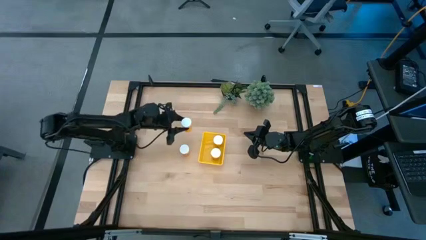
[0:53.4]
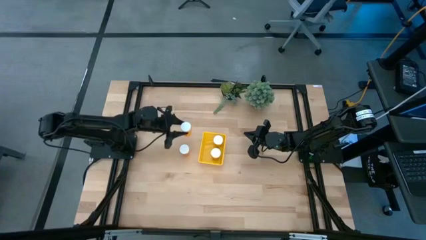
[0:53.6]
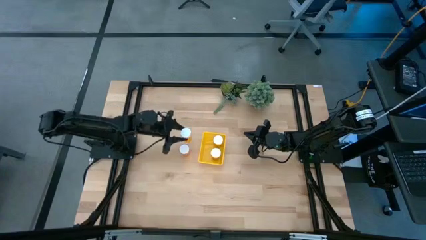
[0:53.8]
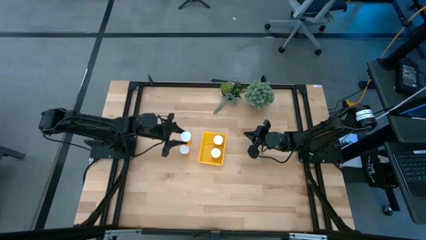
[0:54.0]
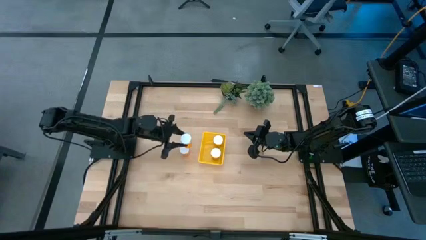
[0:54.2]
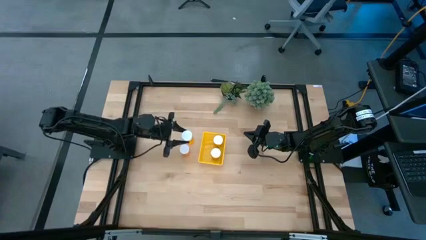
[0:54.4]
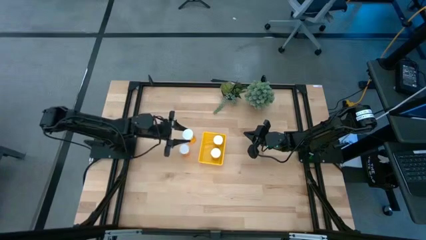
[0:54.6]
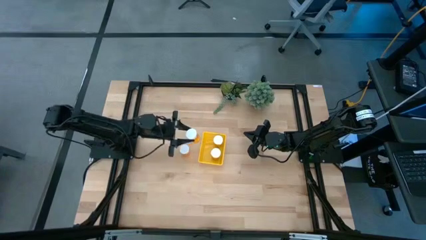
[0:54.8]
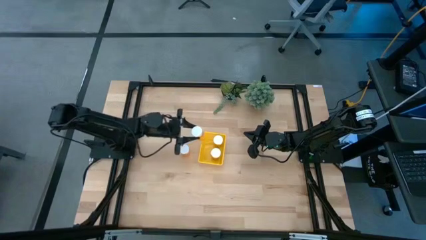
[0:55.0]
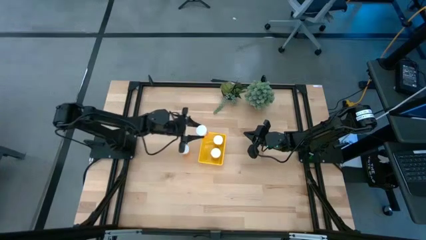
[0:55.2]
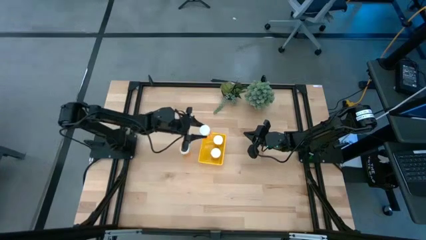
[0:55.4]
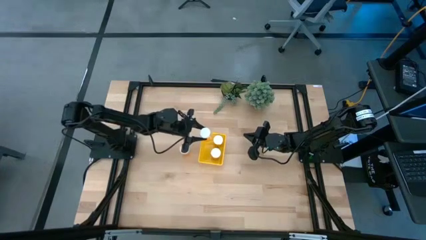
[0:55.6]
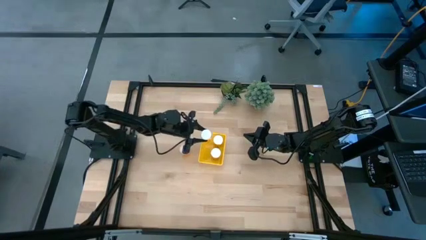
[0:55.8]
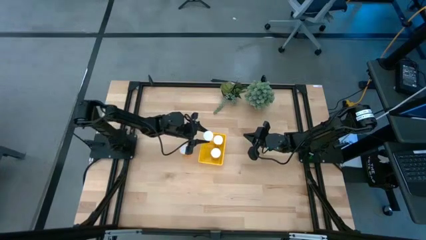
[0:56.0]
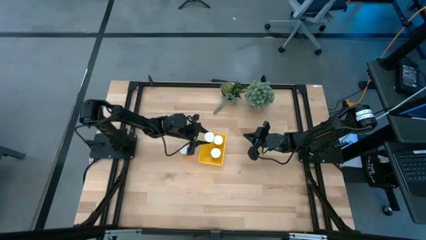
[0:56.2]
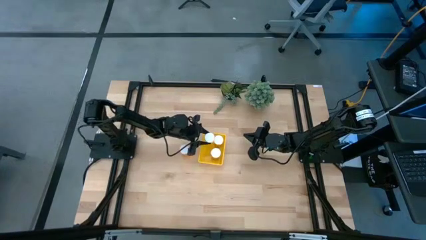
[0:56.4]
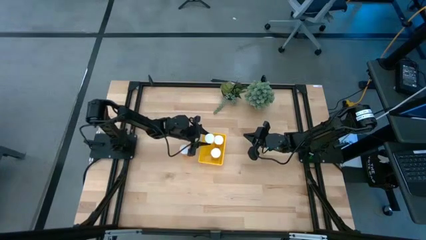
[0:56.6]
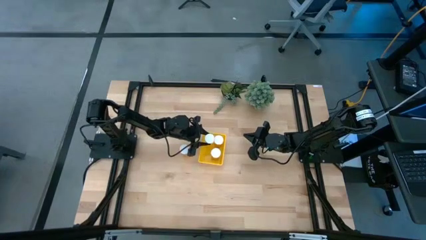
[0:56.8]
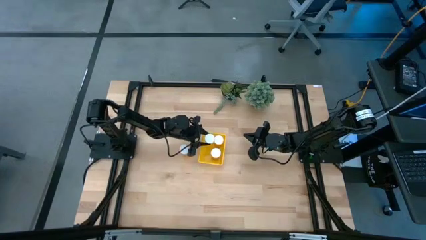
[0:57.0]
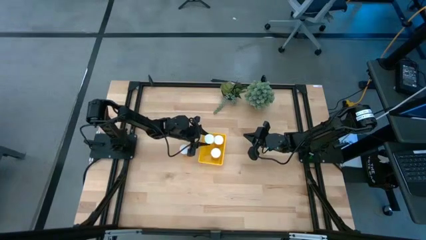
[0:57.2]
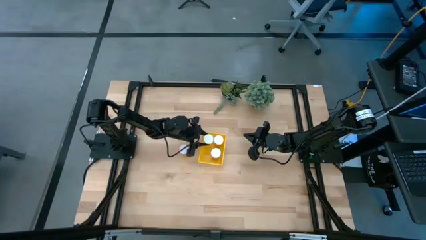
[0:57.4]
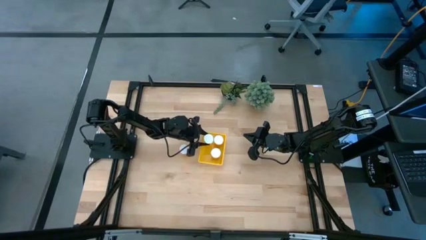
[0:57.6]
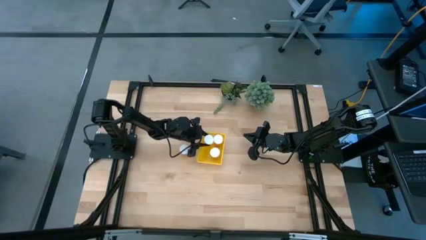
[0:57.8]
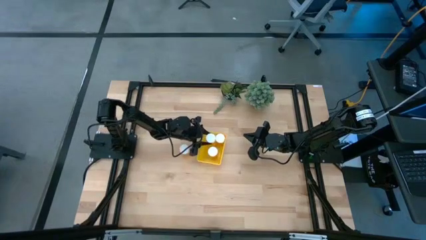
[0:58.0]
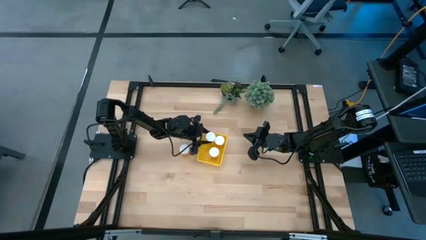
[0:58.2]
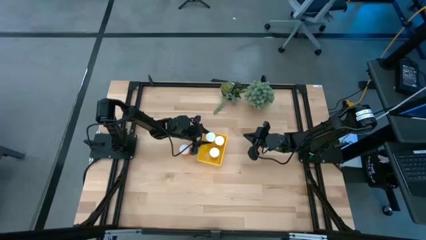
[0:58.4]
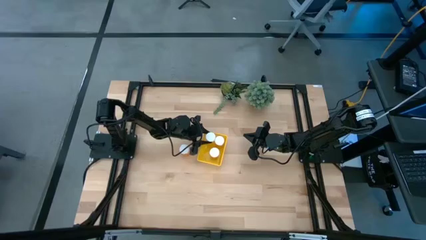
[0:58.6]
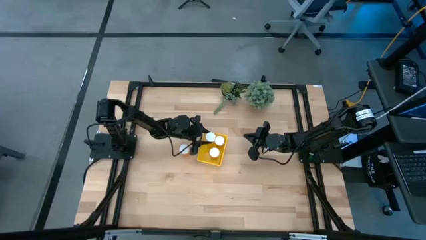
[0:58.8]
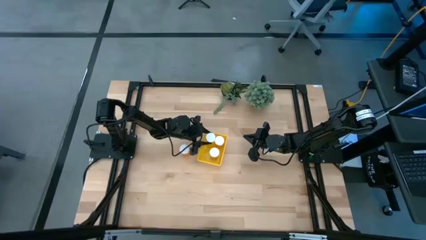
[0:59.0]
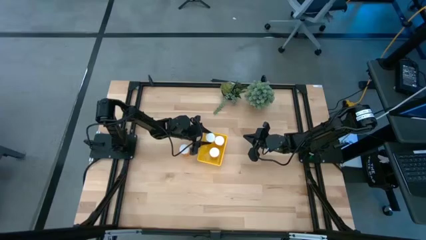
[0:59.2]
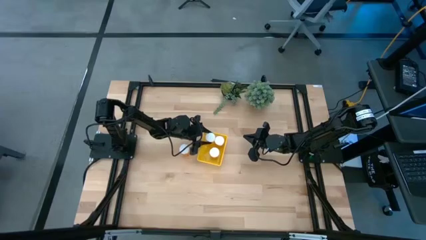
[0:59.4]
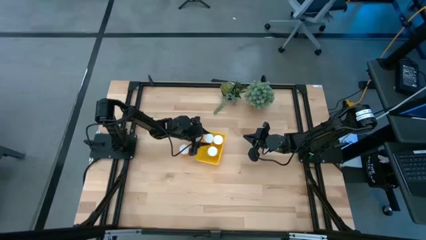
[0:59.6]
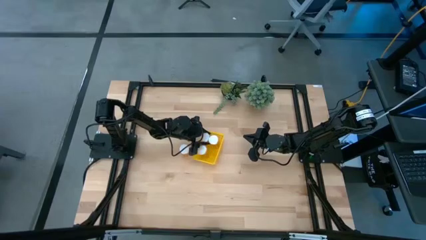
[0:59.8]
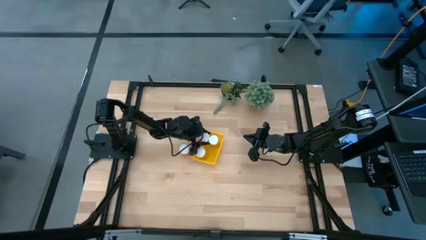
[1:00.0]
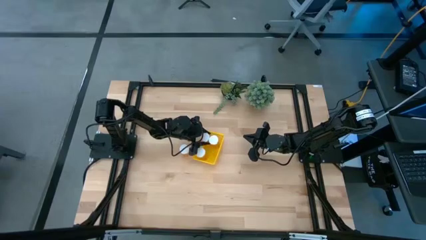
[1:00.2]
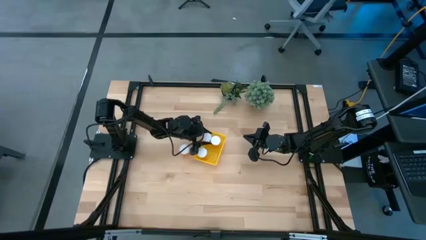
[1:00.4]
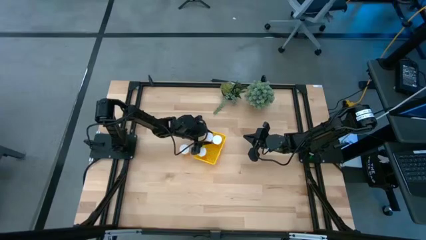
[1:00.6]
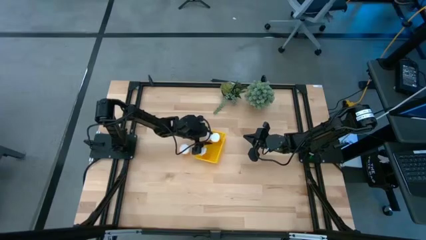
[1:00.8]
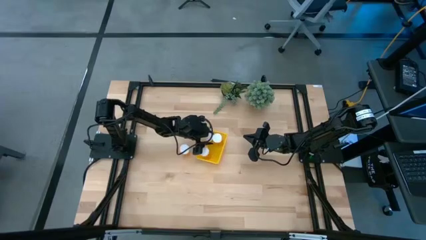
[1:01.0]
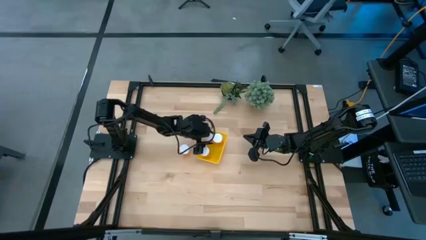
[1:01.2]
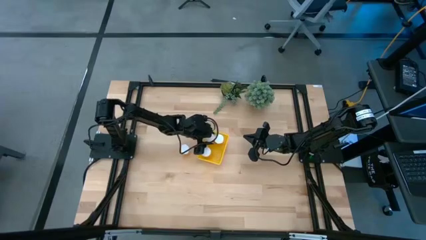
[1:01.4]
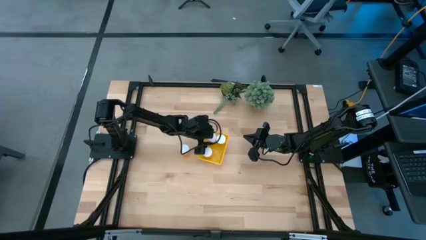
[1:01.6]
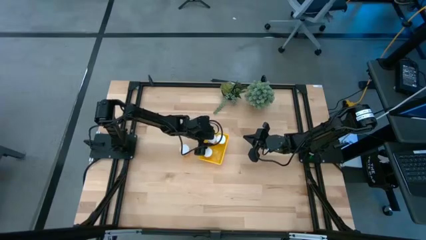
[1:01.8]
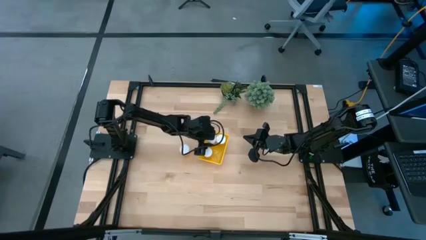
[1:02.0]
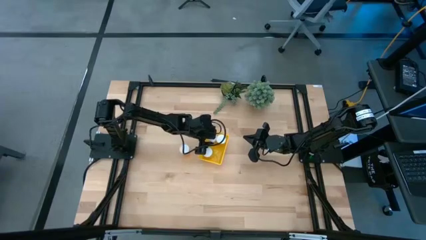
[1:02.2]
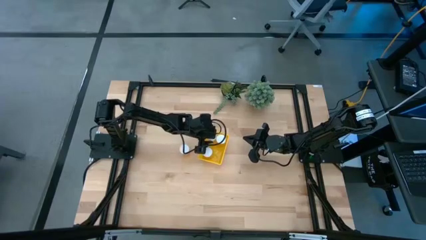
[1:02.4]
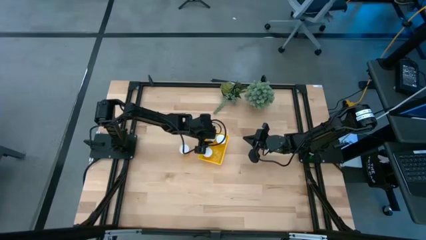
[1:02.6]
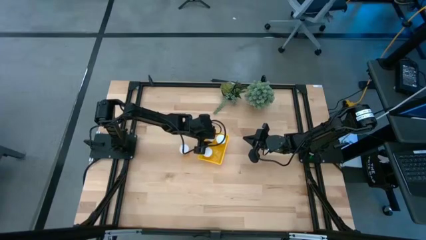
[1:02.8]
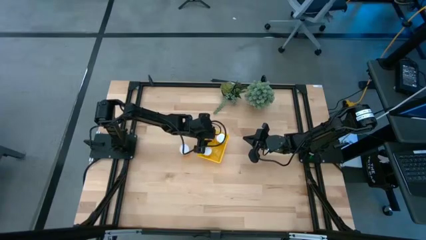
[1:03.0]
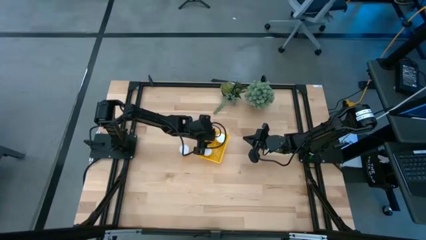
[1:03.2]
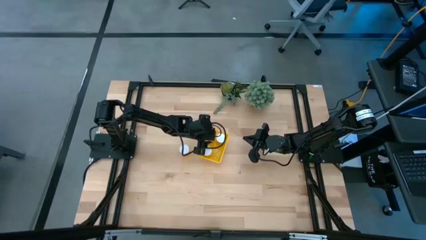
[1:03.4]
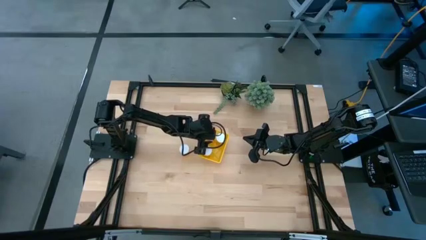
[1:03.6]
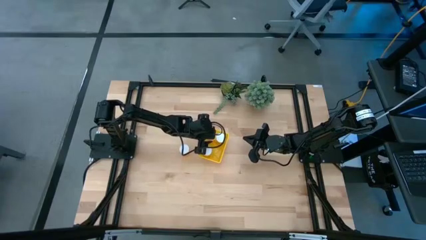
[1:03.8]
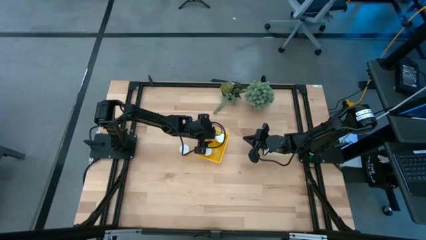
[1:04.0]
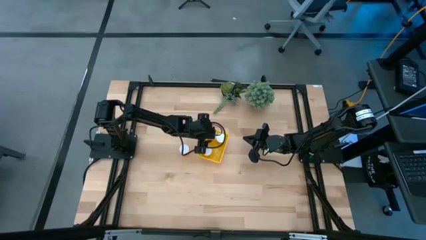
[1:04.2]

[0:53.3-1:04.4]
Task: Pick and place pill bottles into a basket
Put the orange pill bottle into the yellow bin

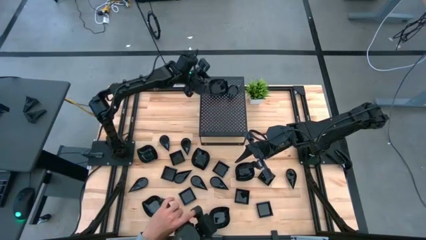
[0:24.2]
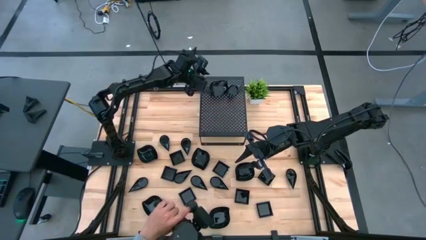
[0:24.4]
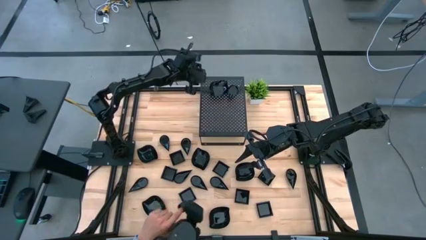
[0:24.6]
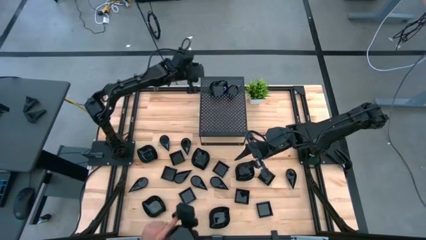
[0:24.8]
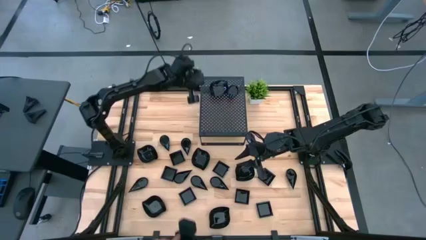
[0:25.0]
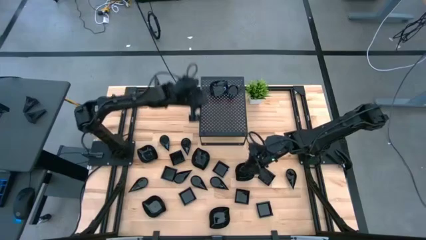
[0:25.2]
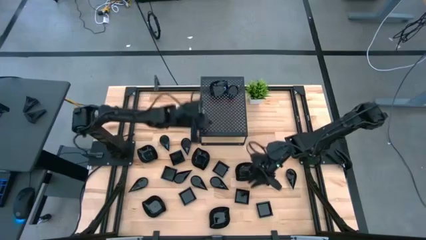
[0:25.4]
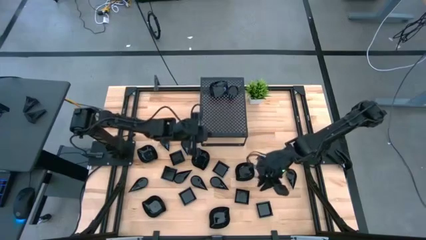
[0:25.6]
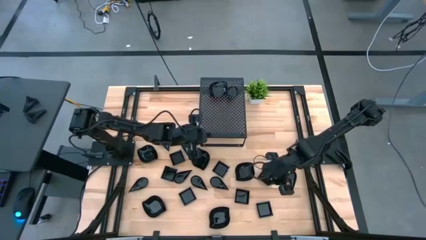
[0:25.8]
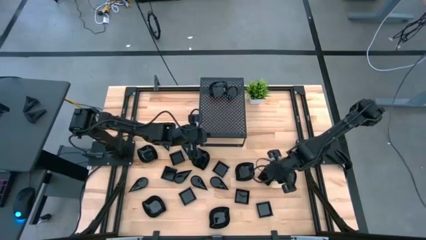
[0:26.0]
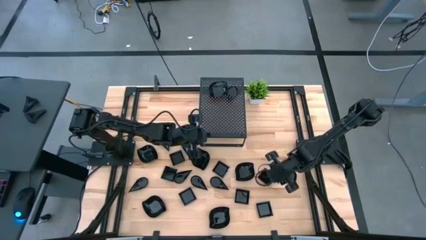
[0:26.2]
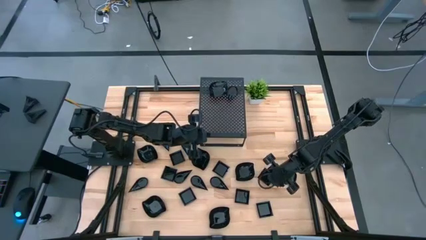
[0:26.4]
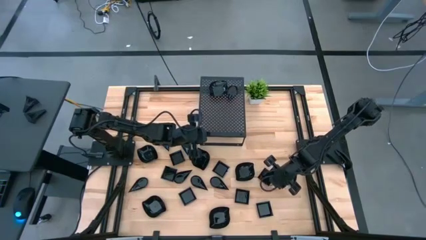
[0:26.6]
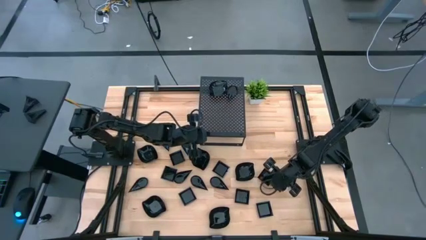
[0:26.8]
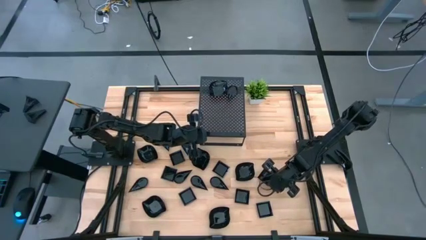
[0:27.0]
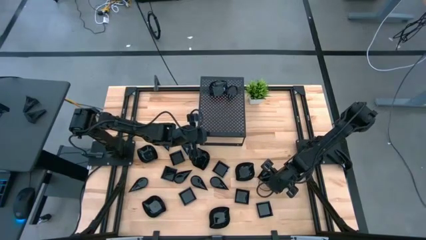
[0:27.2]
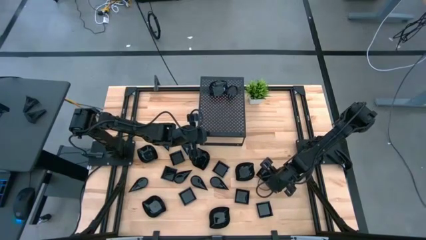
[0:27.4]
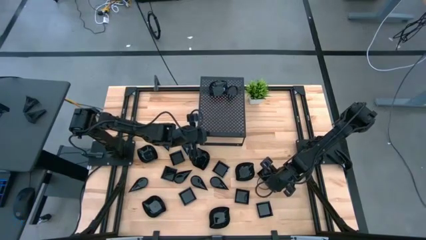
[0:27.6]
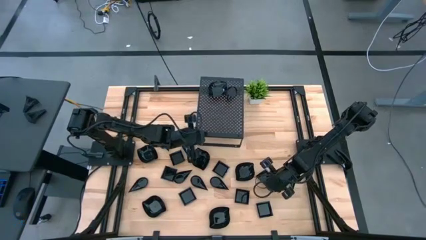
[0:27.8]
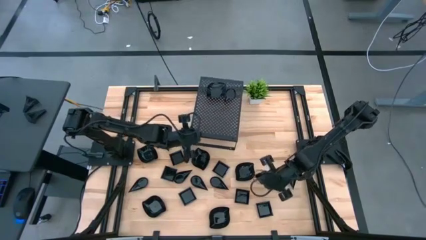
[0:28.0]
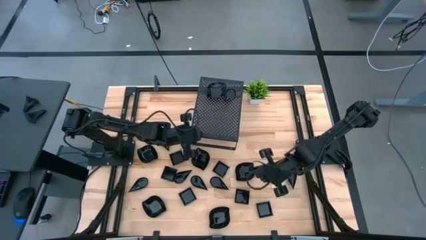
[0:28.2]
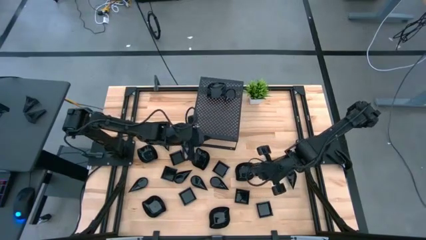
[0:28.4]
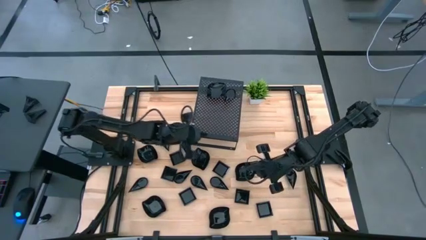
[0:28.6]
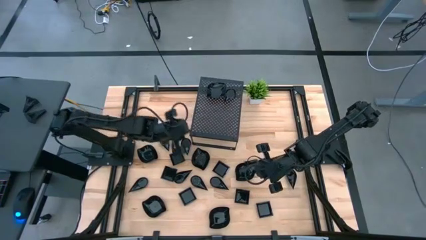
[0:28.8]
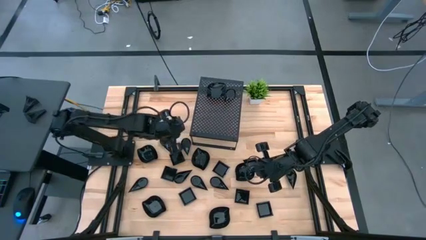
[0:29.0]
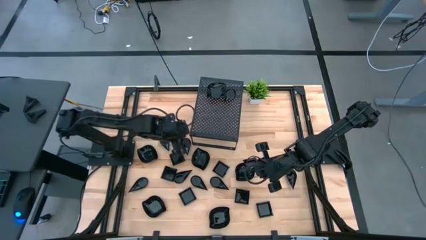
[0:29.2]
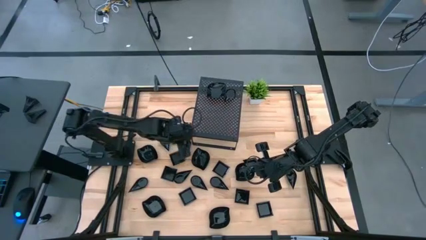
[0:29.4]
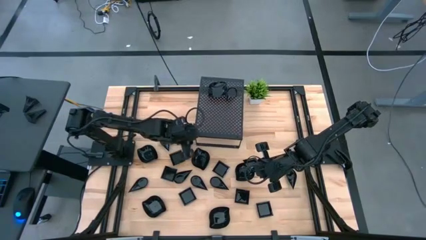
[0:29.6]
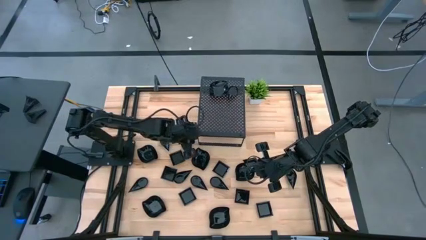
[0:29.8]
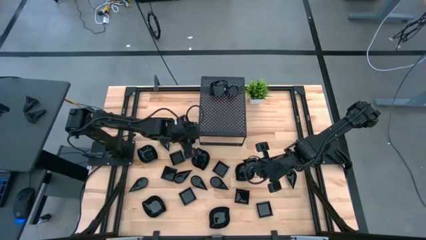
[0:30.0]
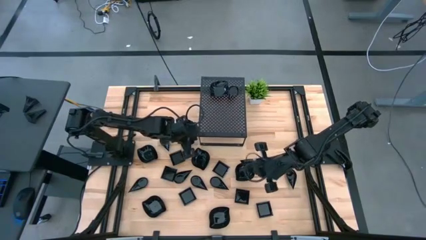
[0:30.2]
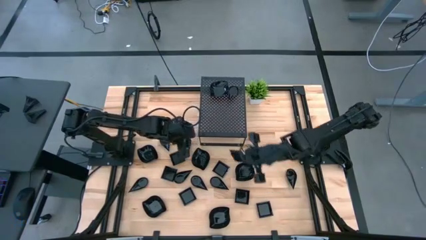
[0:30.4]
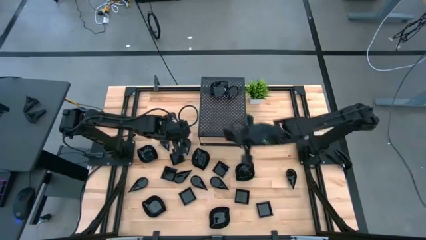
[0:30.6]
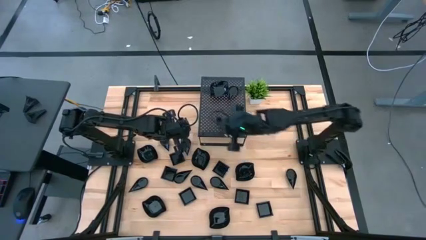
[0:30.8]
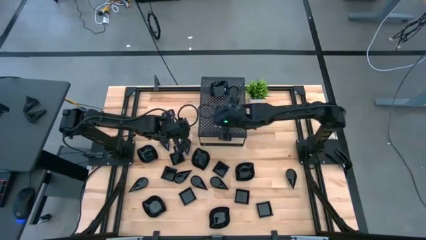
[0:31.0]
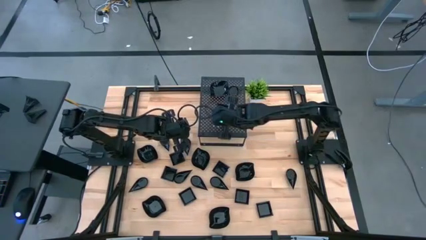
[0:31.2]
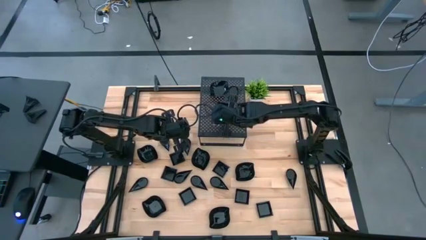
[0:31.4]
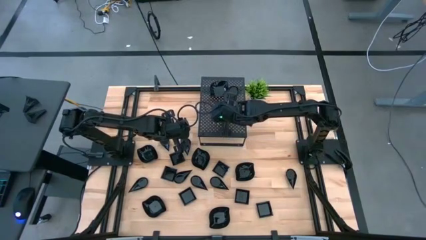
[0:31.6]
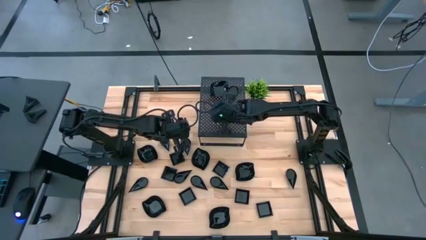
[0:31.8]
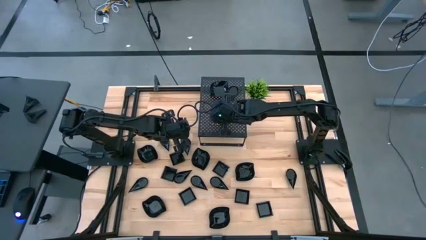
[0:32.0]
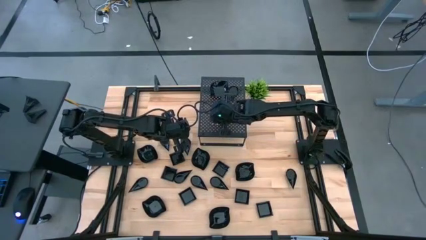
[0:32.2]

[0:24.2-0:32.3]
Task: Pick & Place Mini shaped plates
Put the black square plate on the shelf
